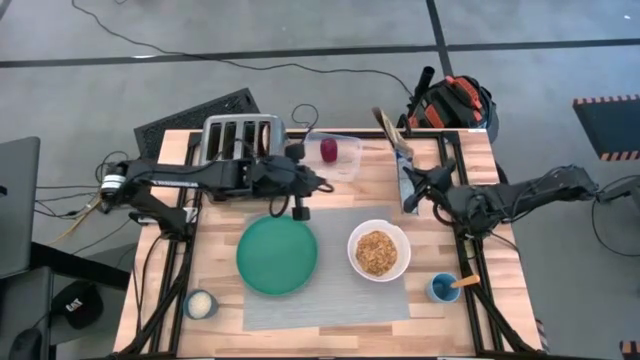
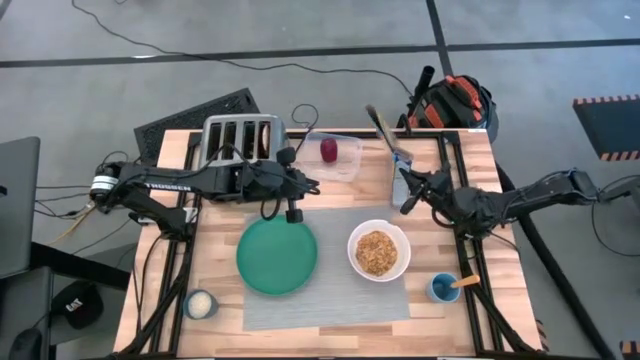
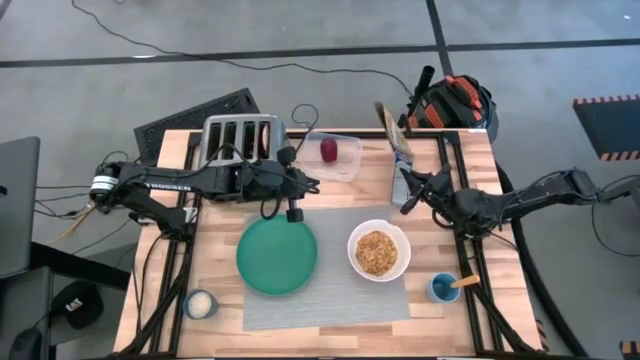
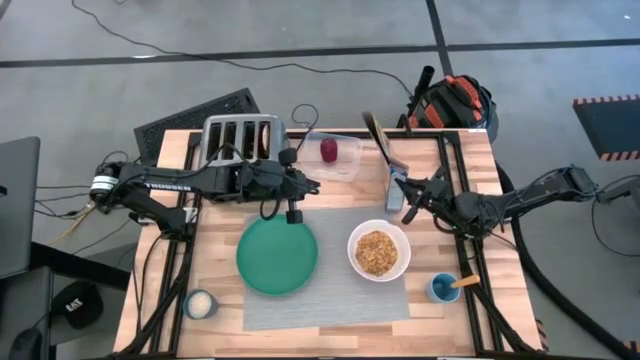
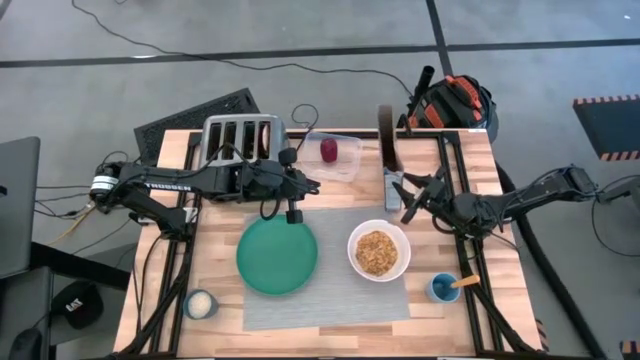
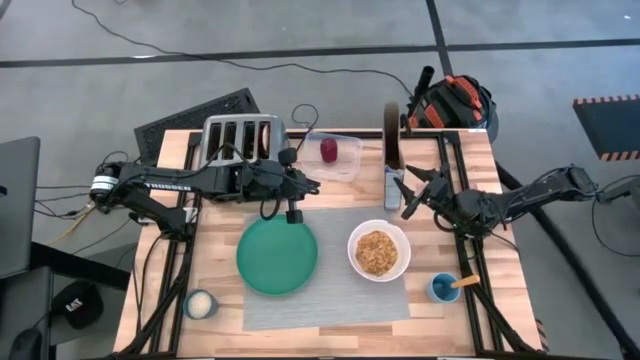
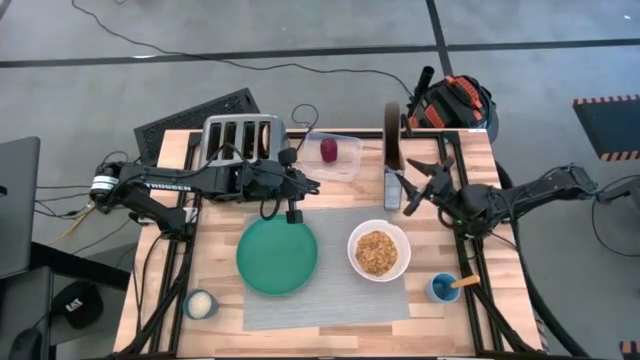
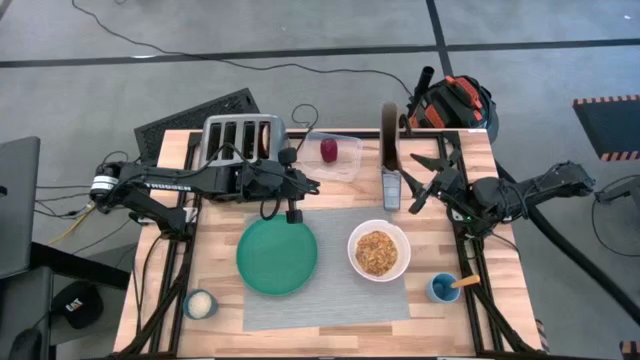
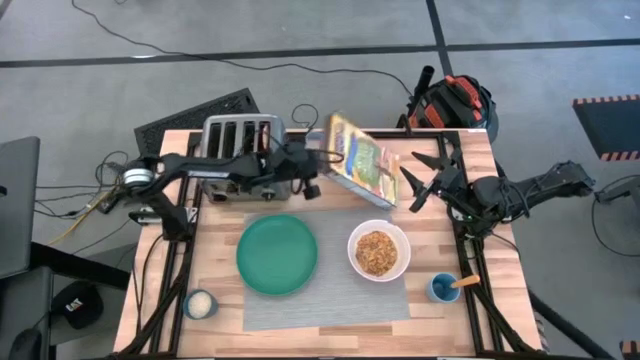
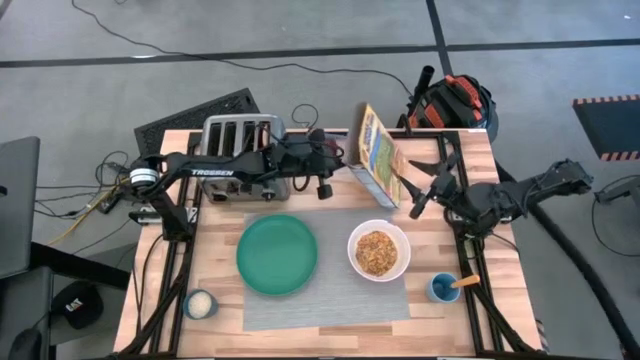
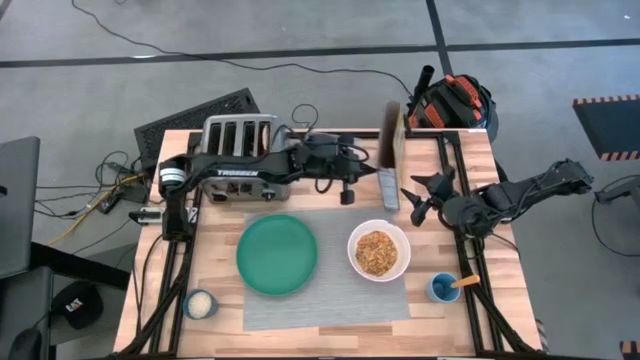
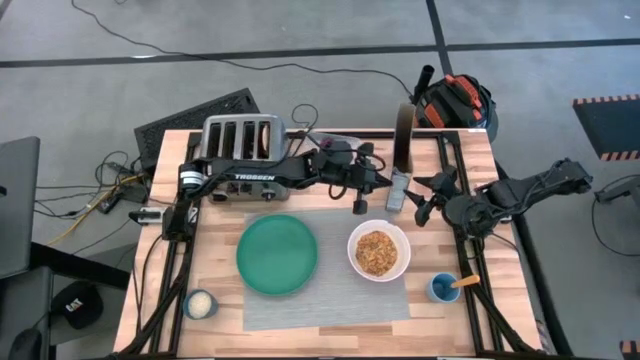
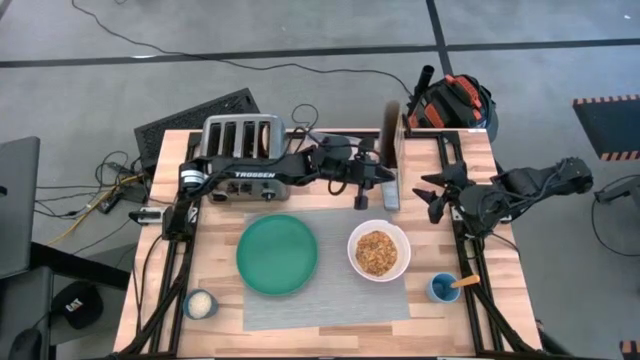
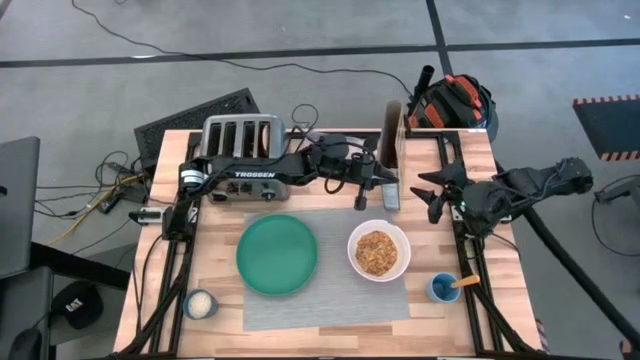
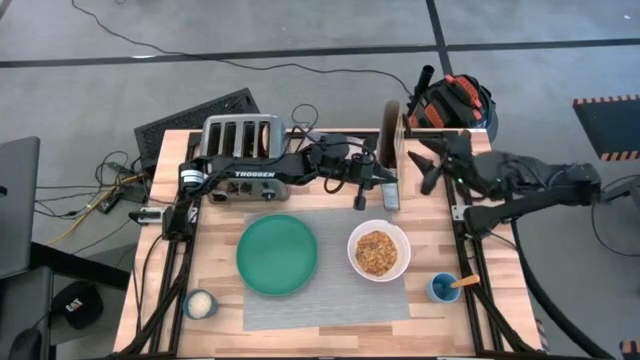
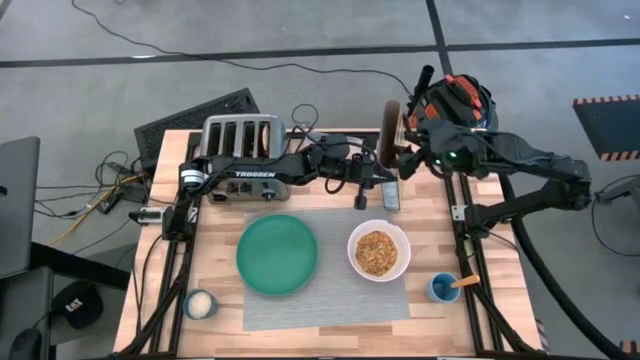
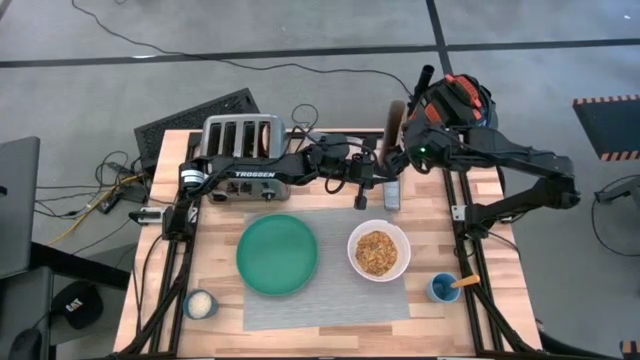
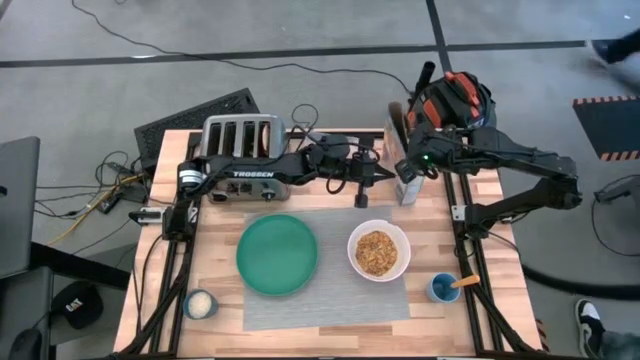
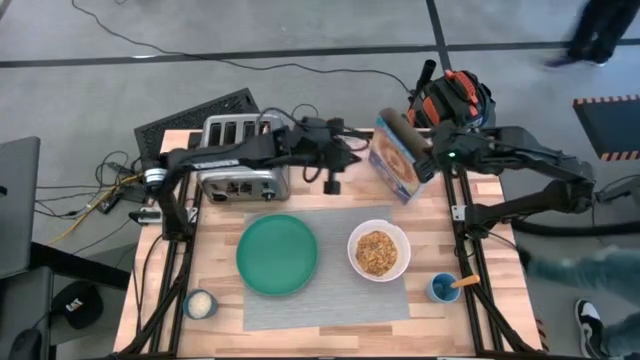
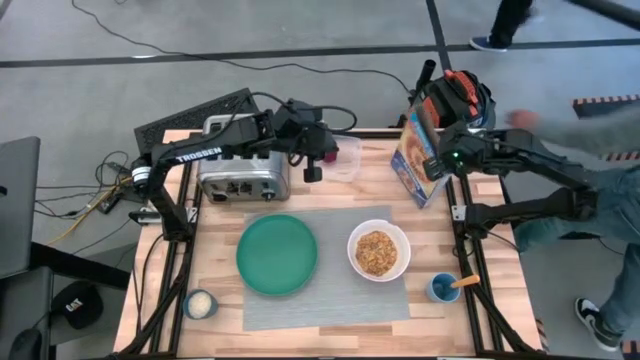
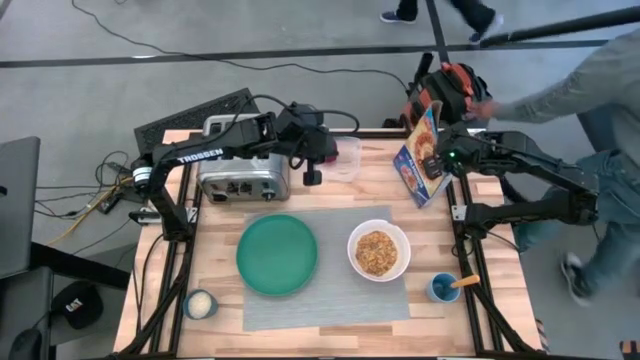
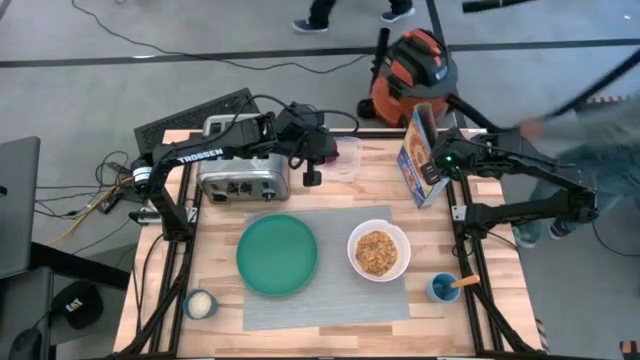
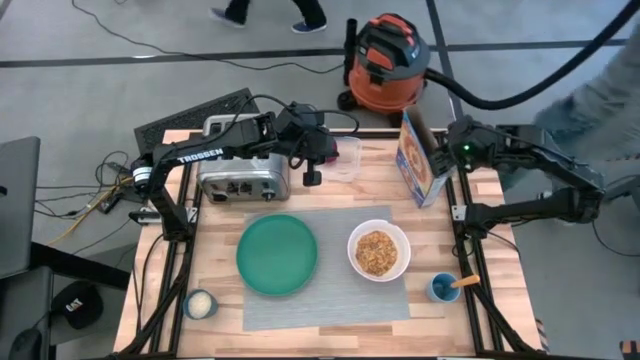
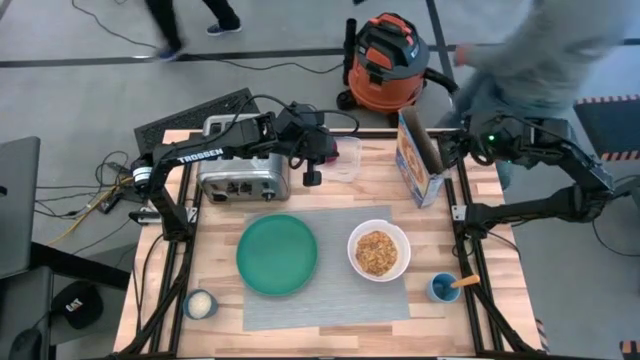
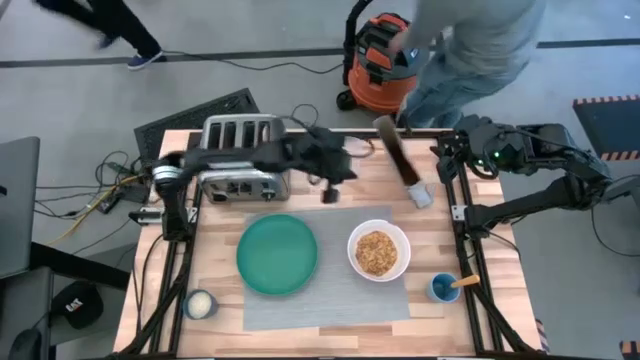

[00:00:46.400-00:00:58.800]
Task: Arrange a breakfast setting
Put the cereal box on the top of the table

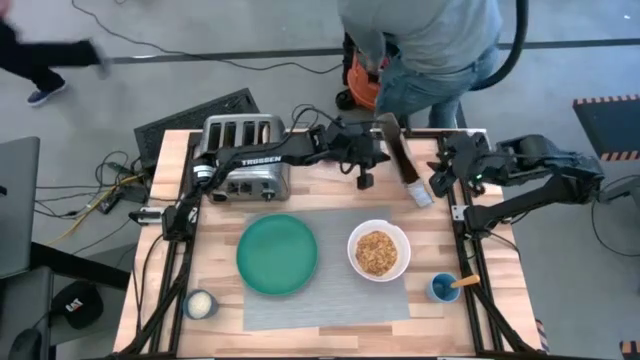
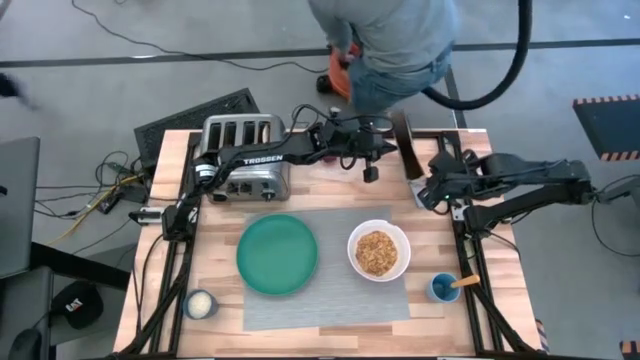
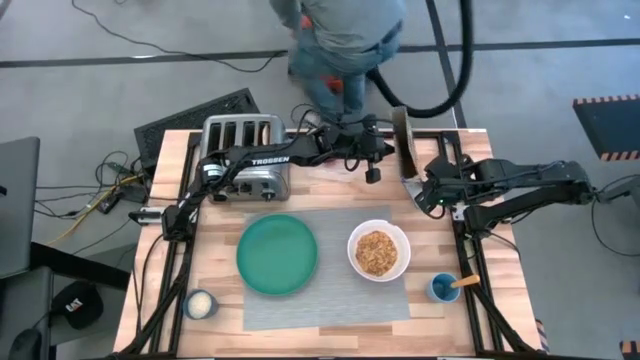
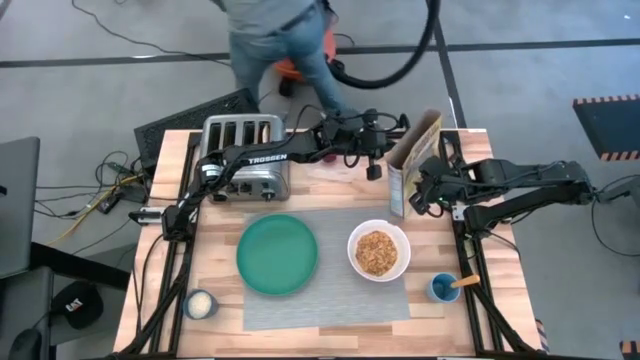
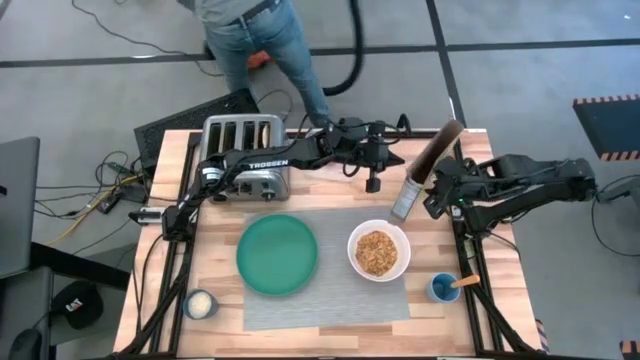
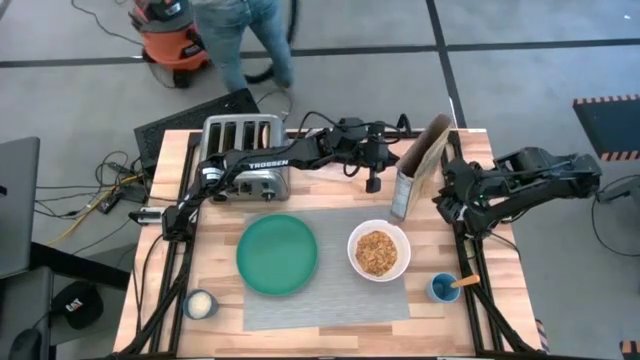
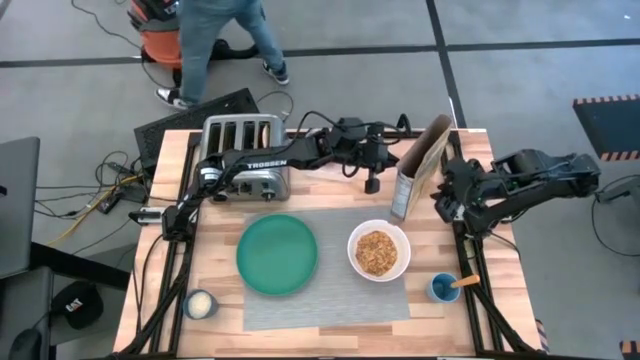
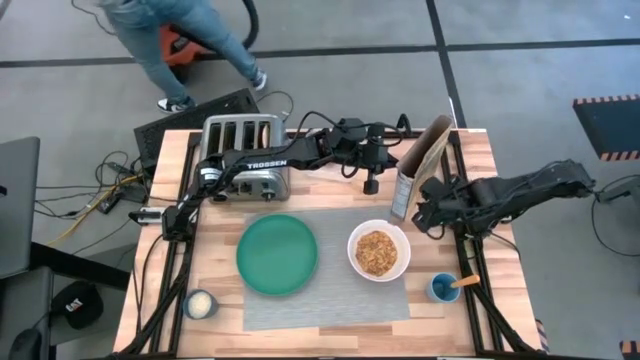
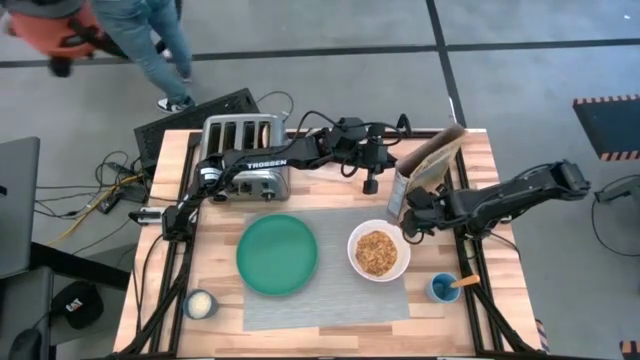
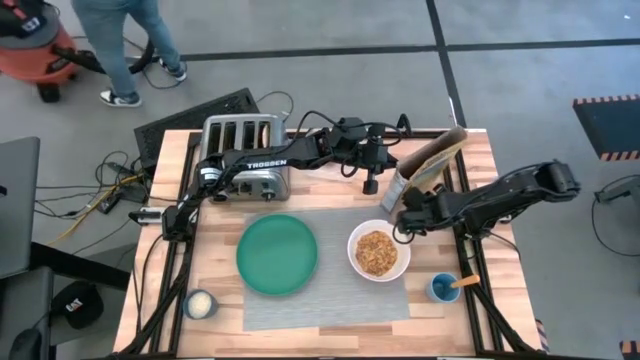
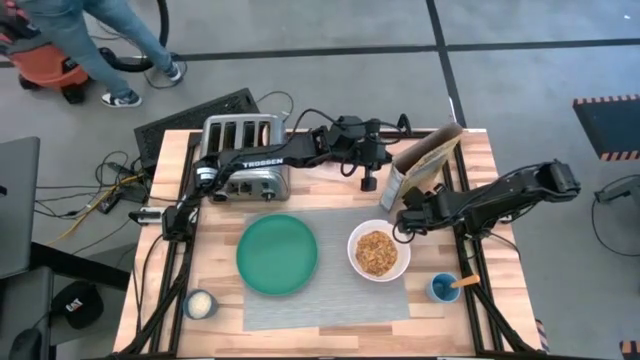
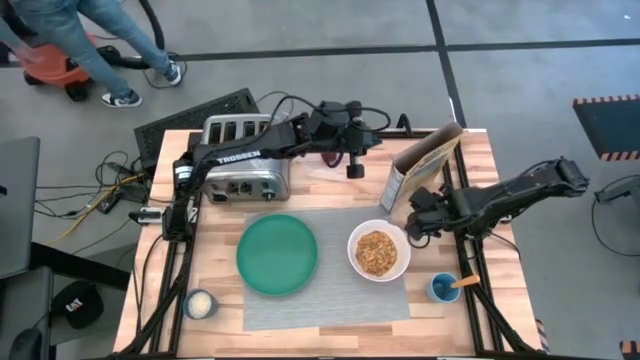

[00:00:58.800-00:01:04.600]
Put the cereal box on the top of the table

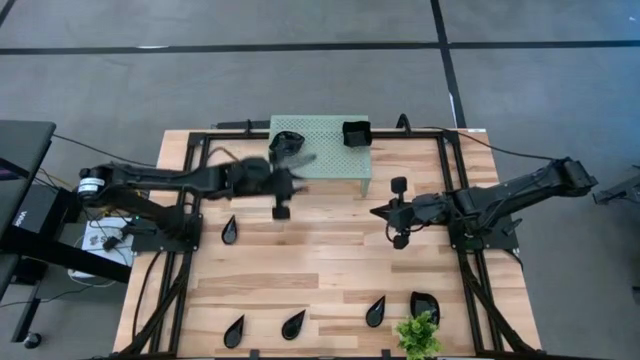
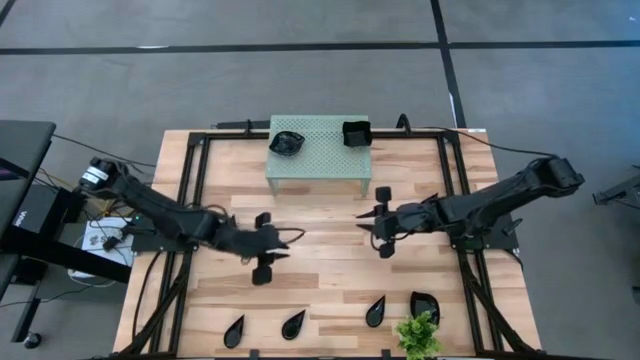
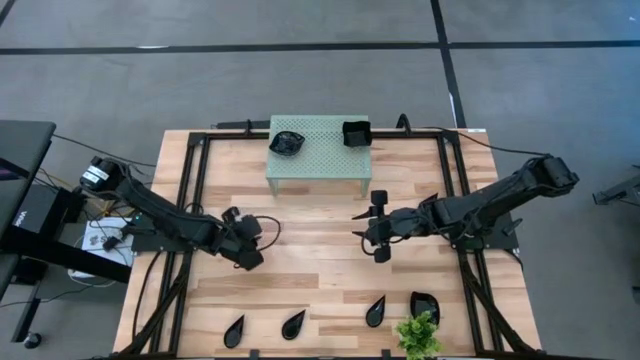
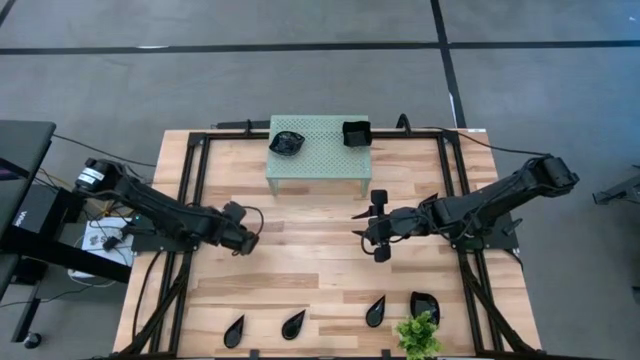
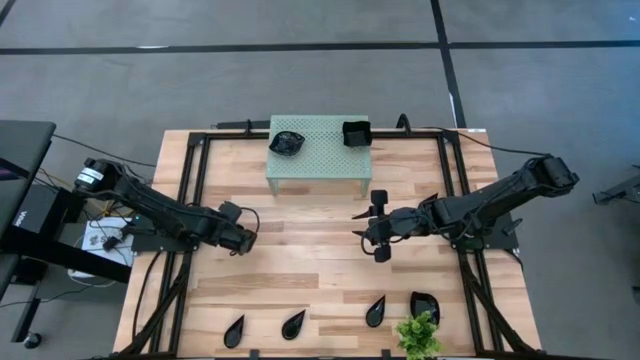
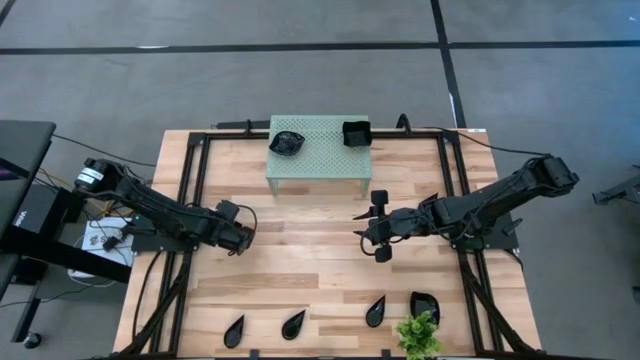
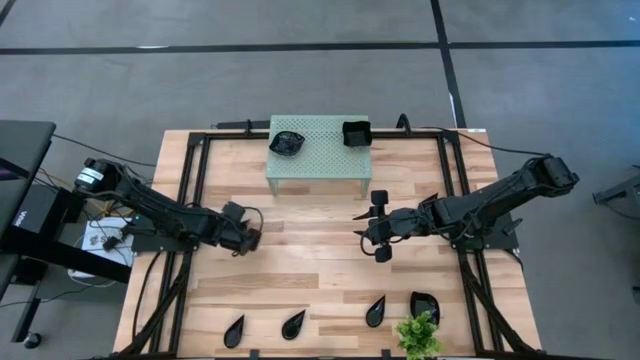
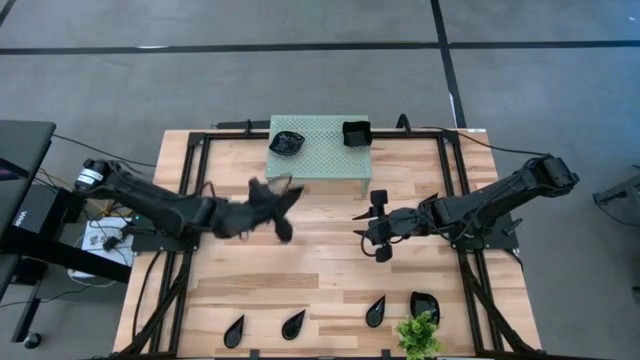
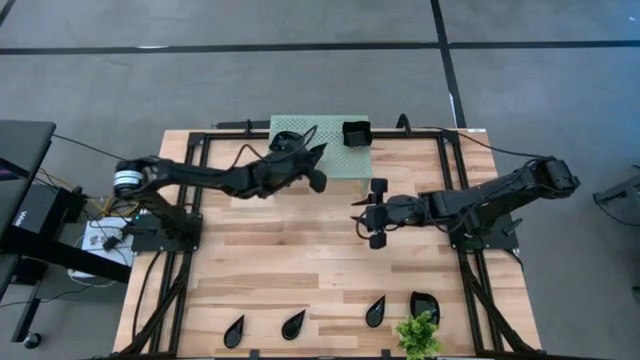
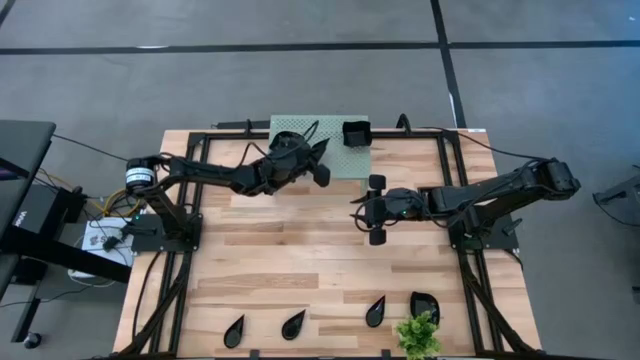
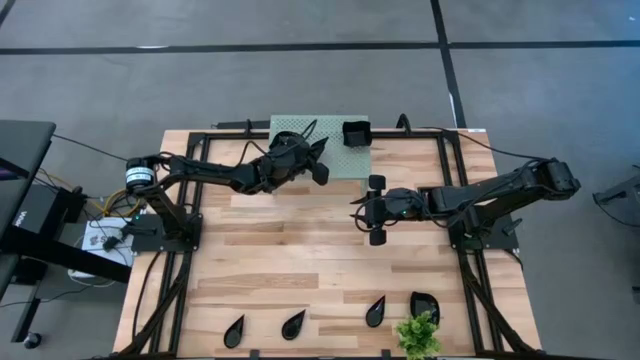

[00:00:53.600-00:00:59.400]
Task: Pick & Place Mini shaped plates
Put the drop-shaped plate on the shelf
